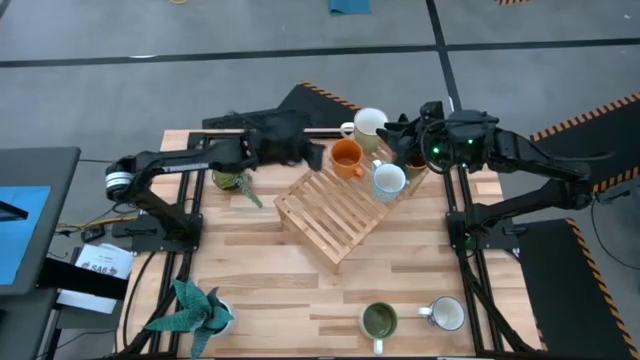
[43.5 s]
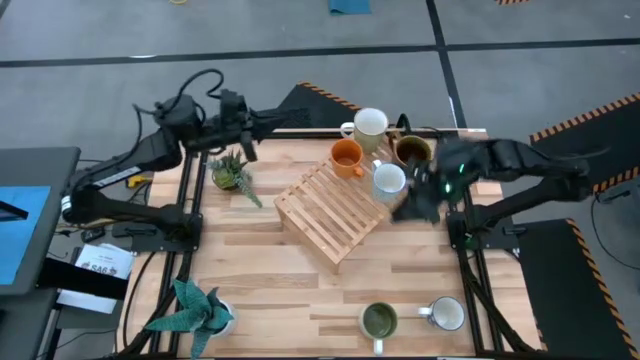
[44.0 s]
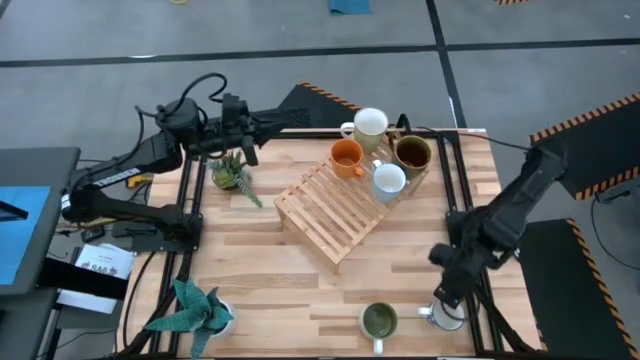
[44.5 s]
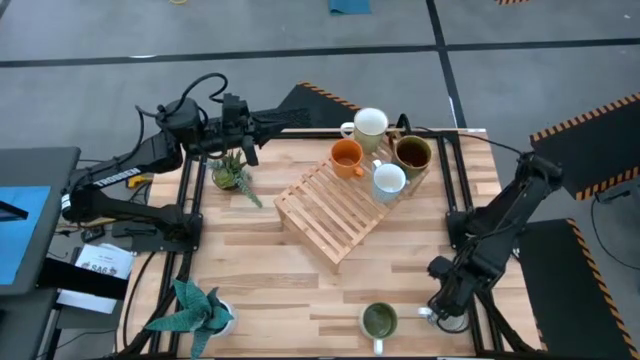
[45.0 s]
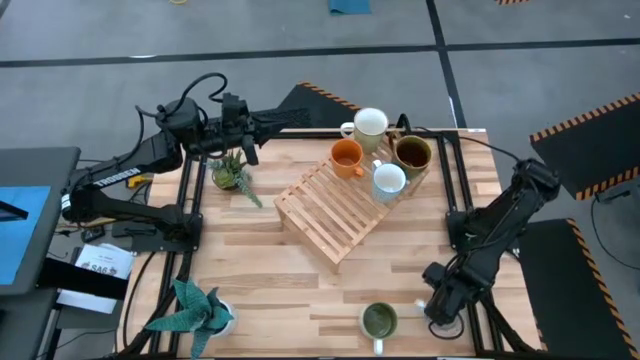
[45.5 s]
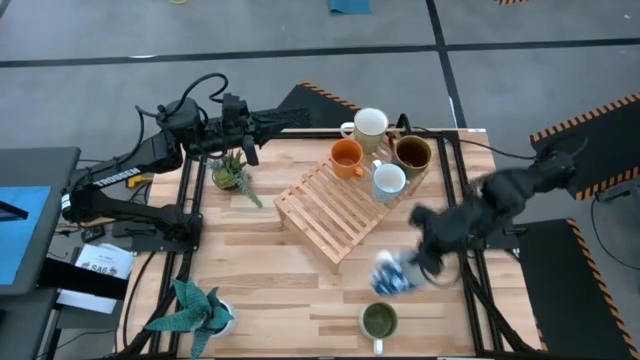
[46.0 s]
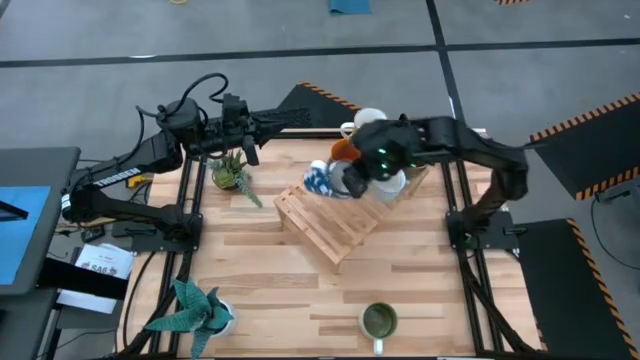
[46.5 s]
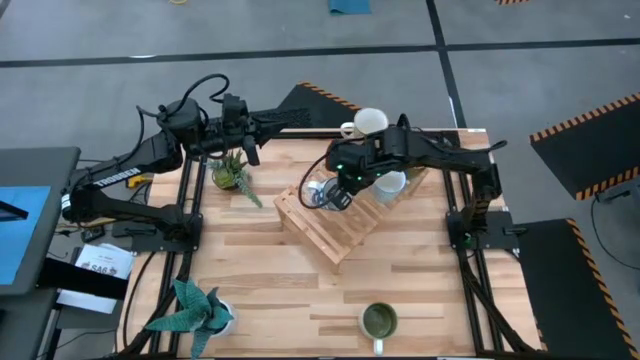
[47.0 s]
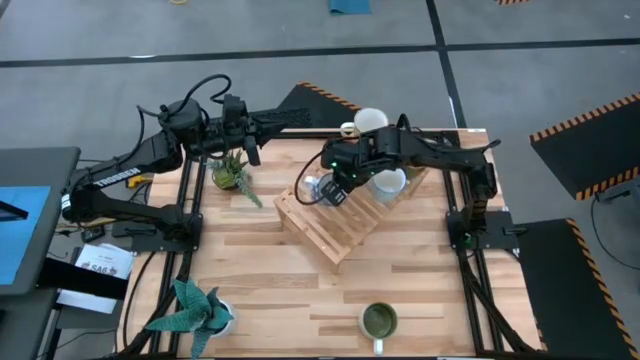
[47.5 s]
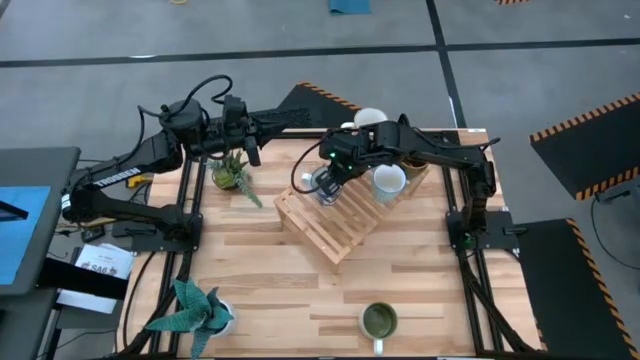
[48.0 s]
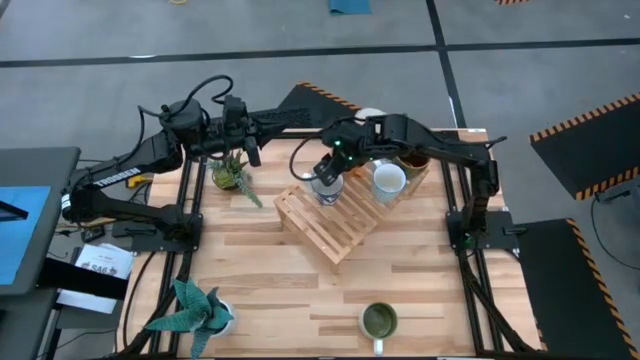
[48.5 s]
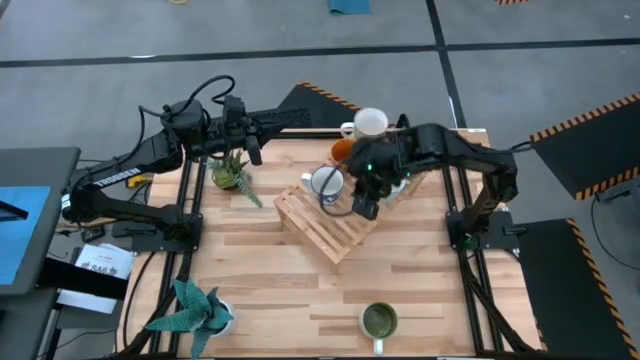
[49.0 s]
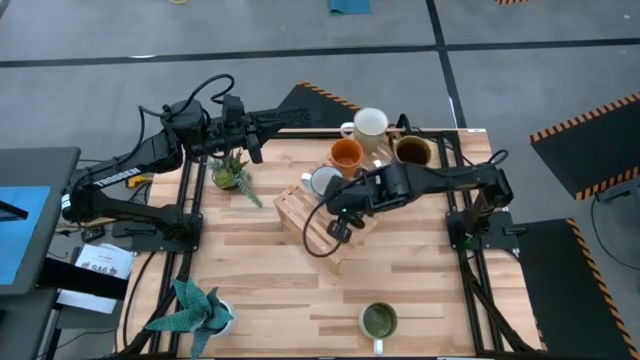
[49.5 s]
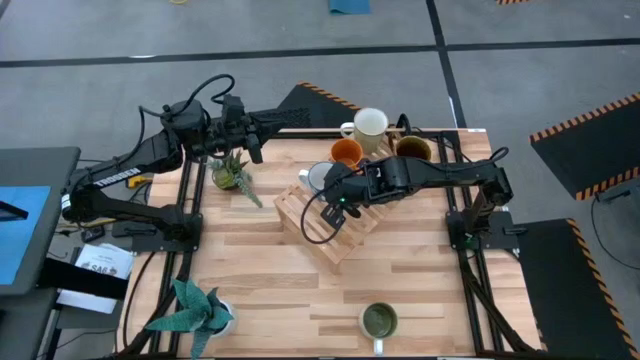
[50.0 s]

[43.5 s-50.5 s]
Task: Place coffee mugs
Put the blue white mug on the shelf

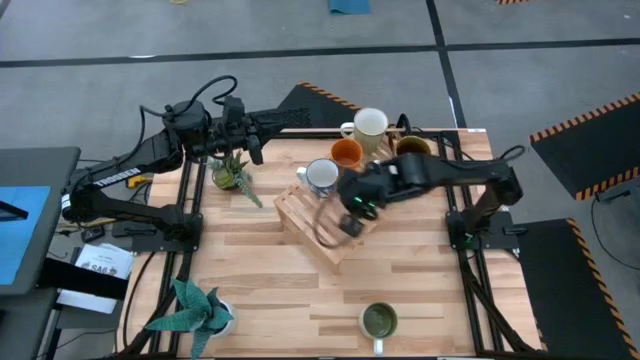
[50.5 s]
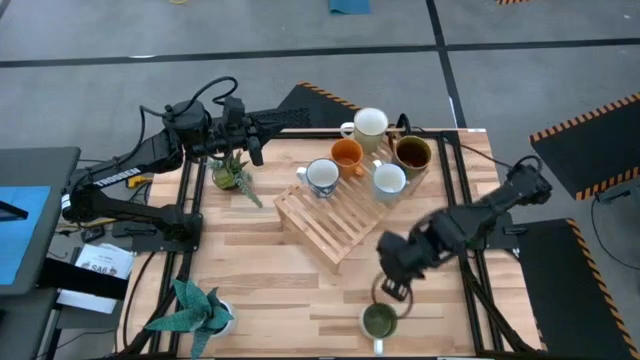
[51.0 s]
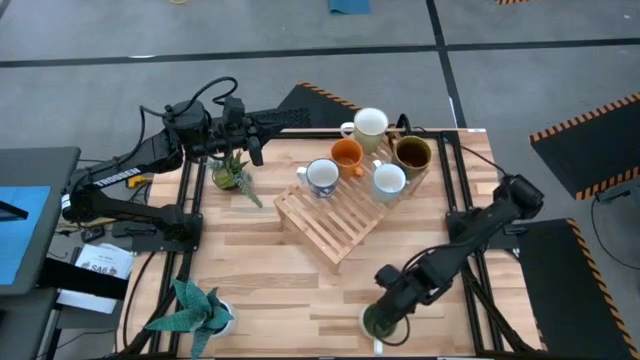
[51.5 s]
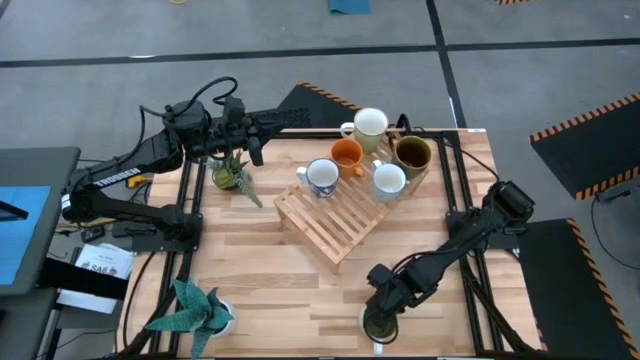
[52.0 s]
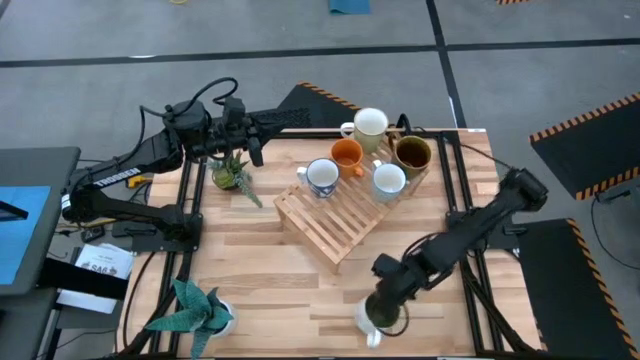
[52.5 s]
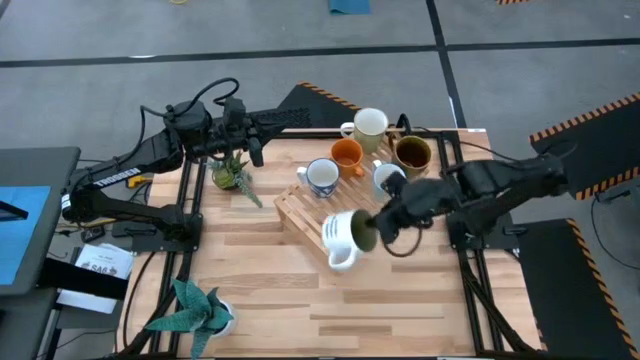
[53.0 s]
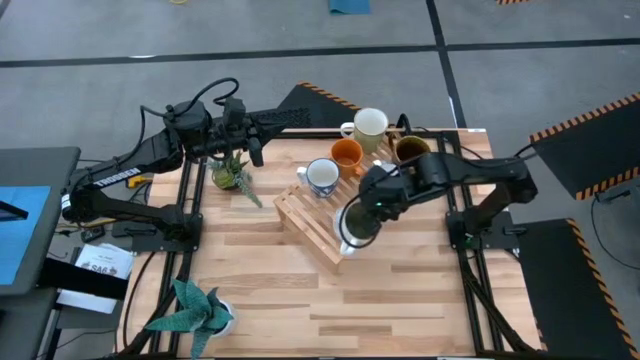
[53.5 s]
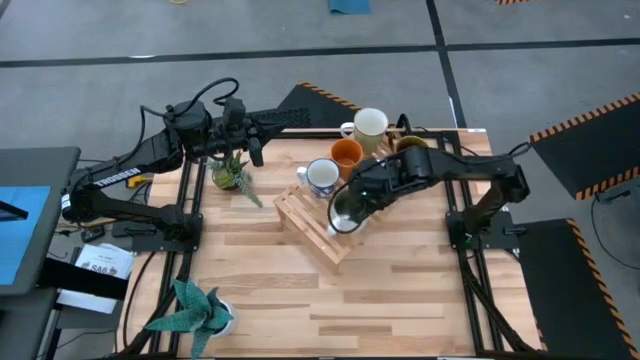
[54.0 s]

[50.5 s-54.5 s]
Put the green white mug on the shelf

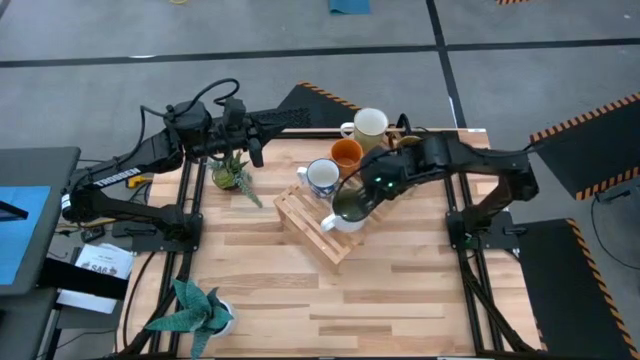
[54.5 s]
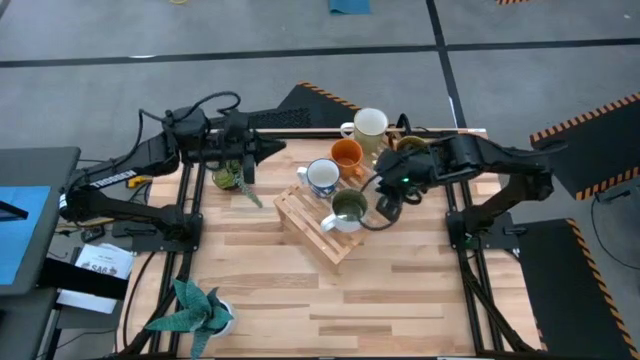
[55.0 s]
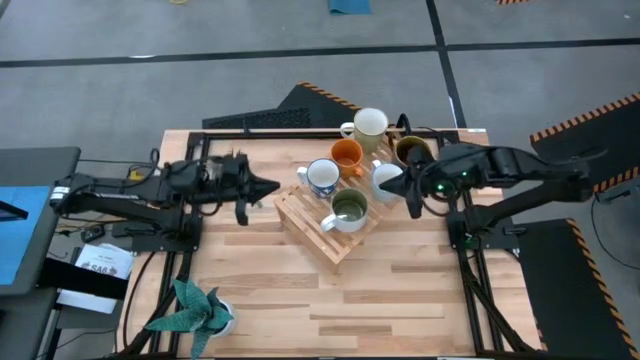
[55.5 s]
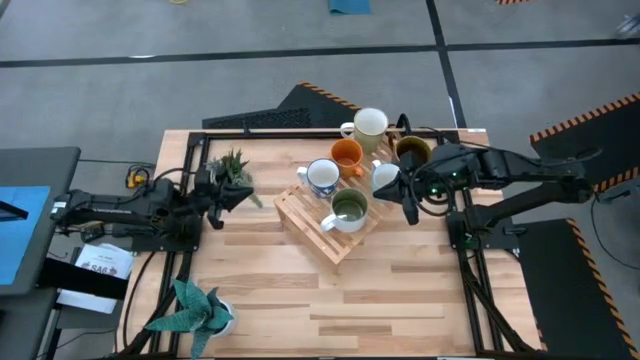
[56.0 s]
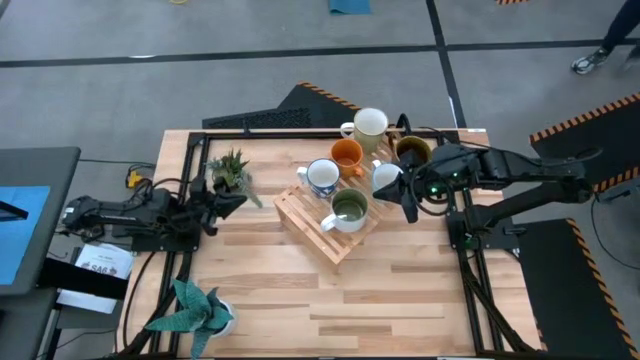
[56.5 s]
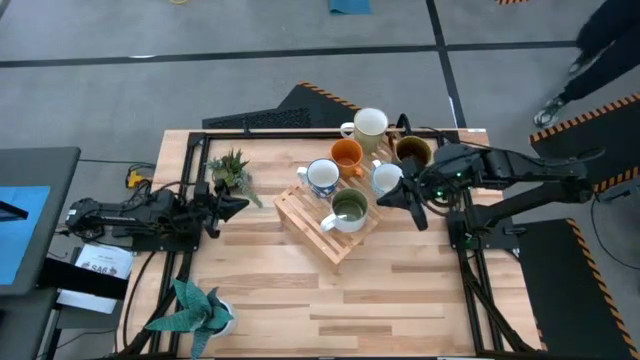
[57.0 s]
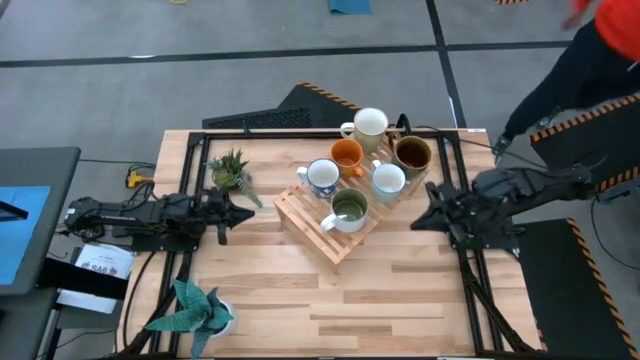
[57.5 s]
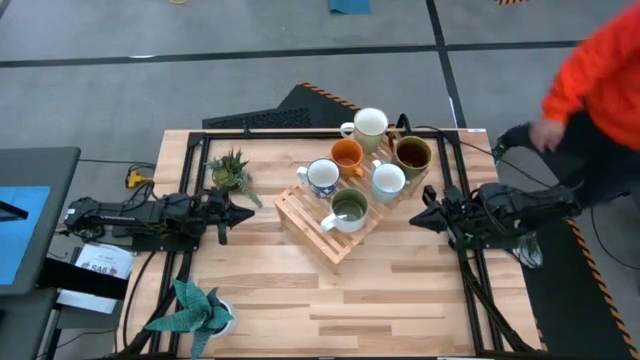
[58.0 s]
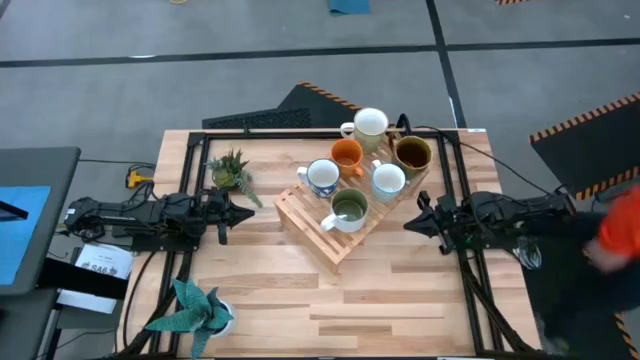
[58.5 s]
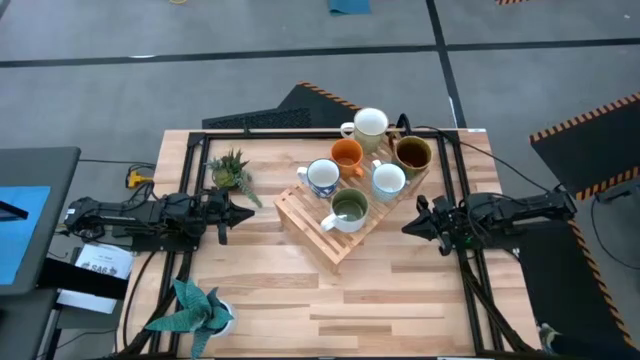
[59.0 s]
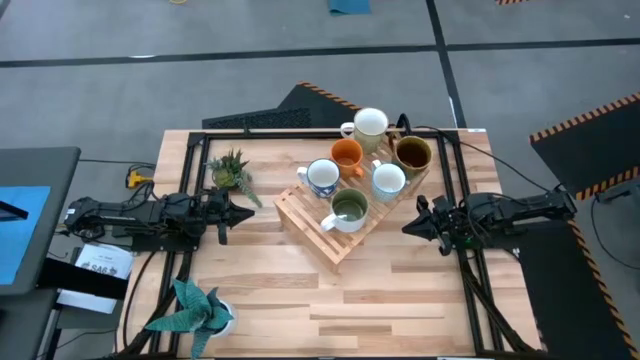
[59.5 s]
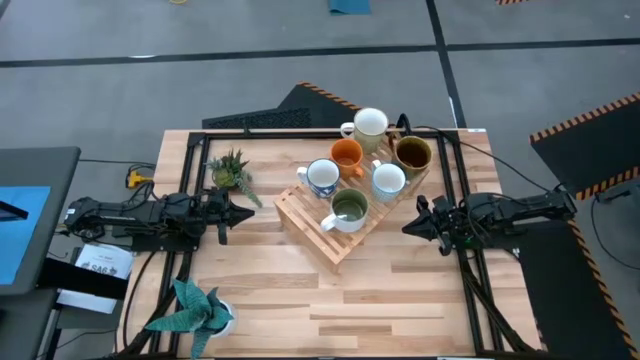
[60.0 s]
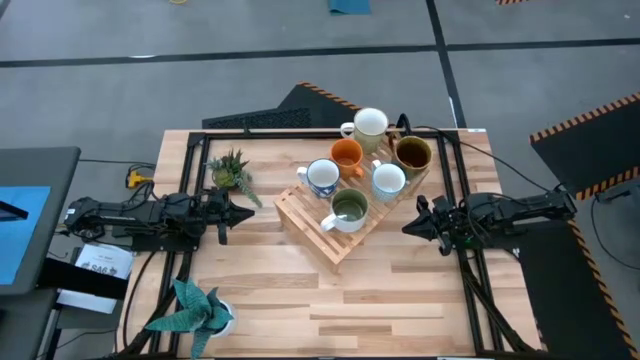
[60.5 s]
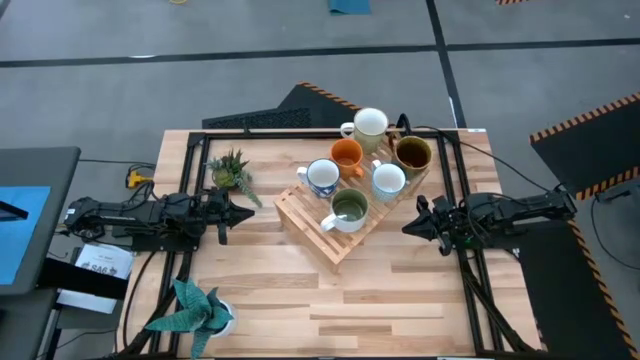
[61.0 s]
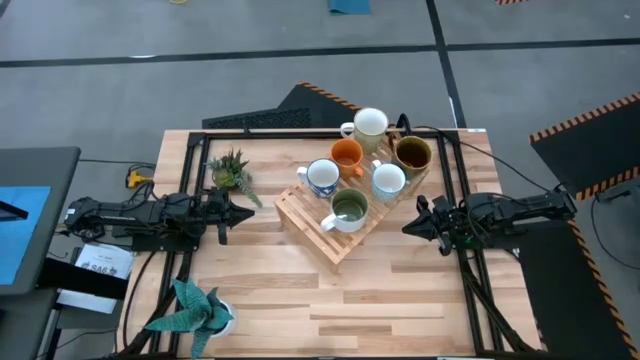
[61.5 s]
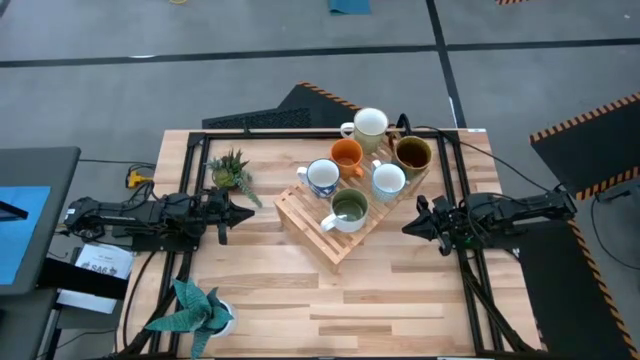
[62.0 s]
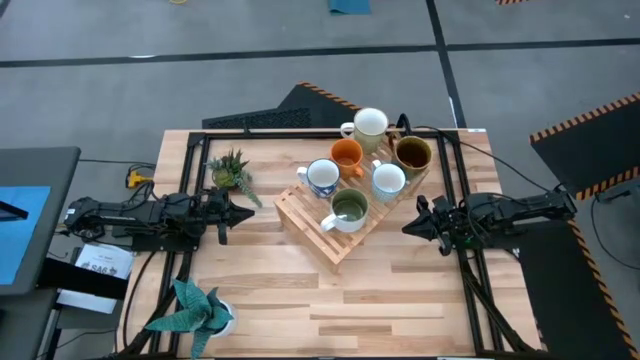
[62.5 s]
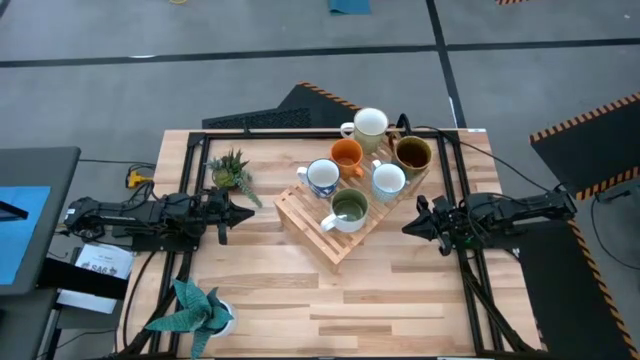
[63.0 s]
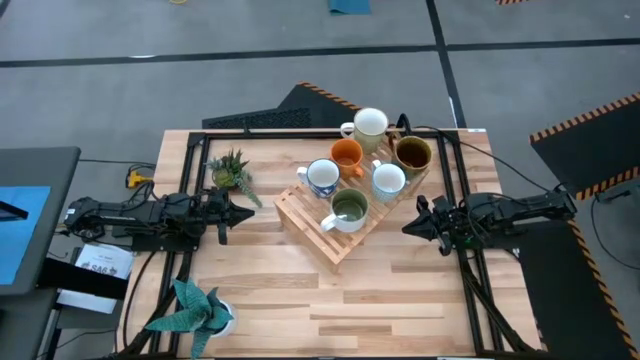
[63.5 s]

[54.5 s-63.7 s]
Return to Home Position

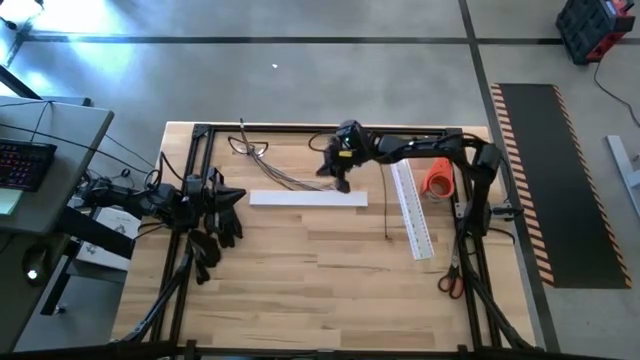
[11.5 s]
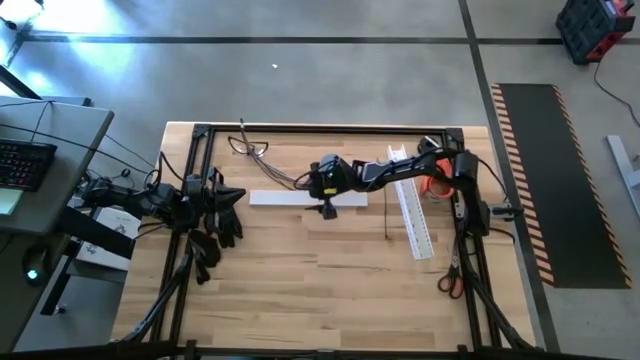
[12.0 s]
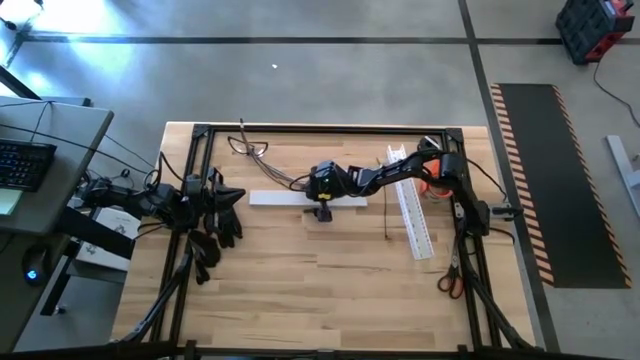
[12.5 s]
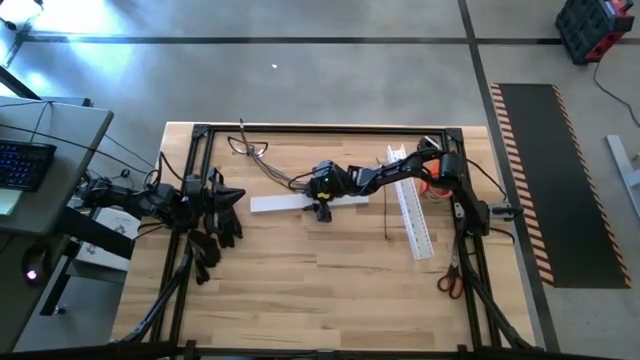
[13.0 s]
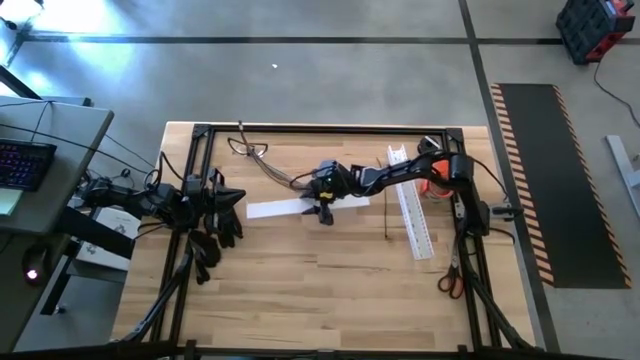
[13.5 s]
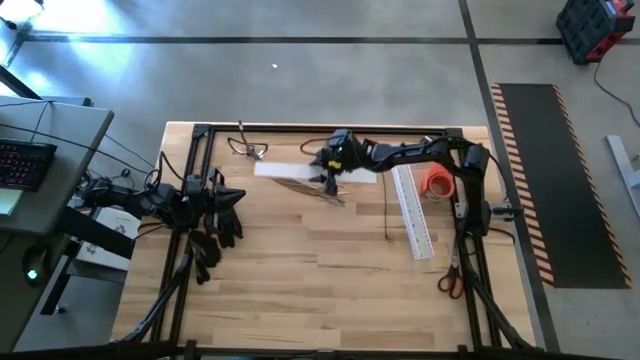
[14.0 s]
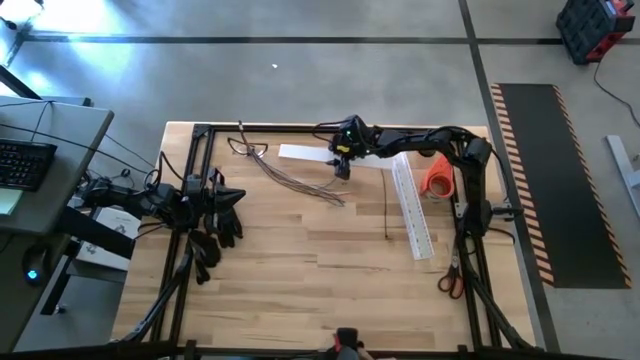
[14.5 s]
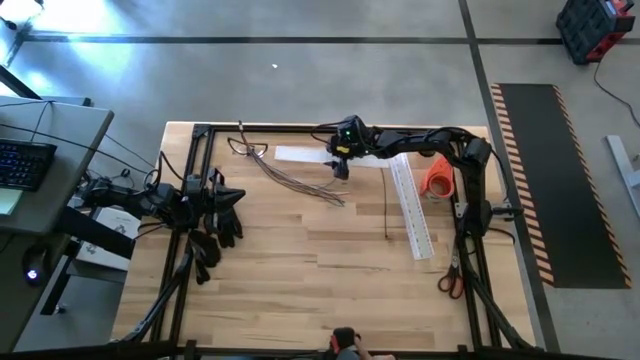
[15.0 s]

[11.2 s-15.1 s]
Task: Ziptie cables
Move the cable duct cover from the center to the table to the top center part of the table
